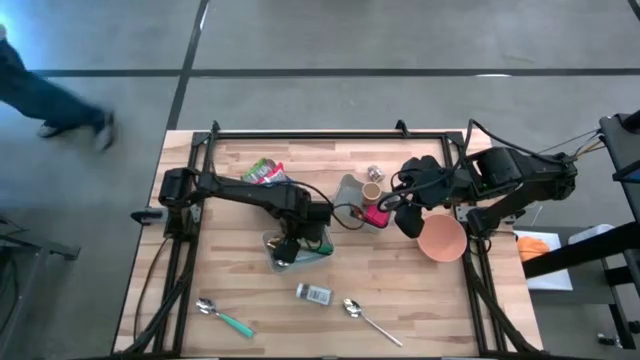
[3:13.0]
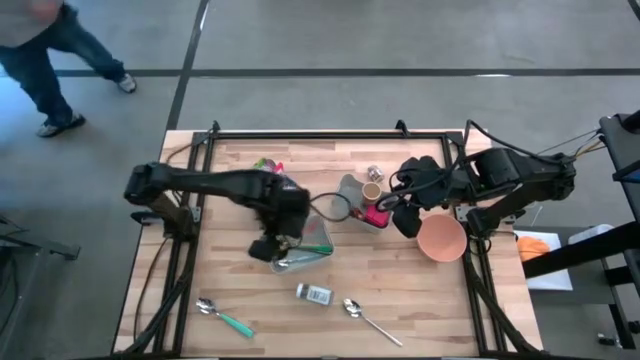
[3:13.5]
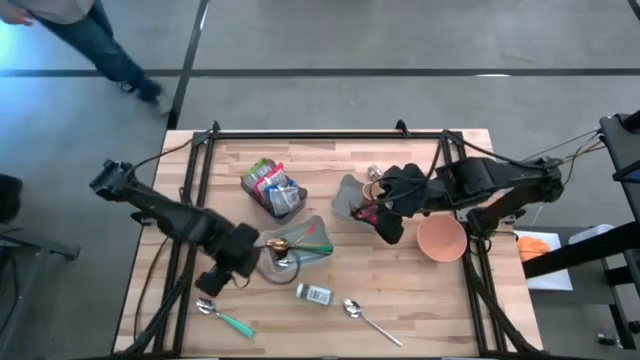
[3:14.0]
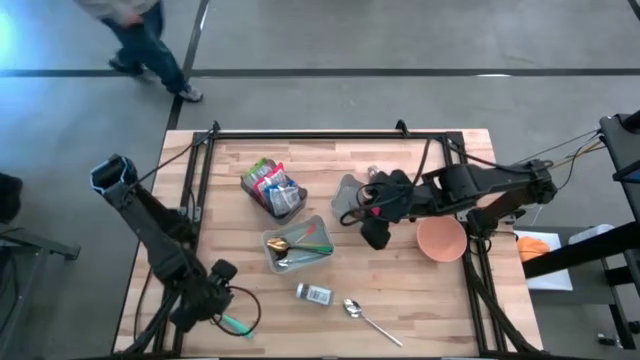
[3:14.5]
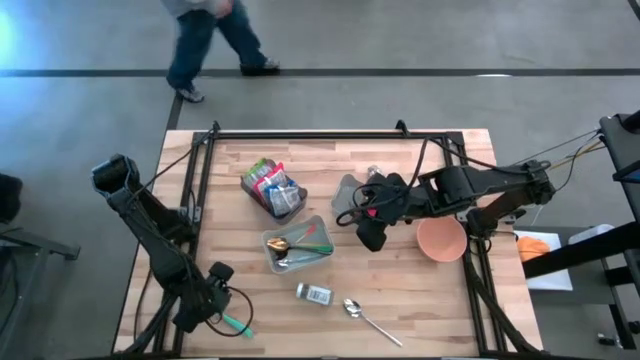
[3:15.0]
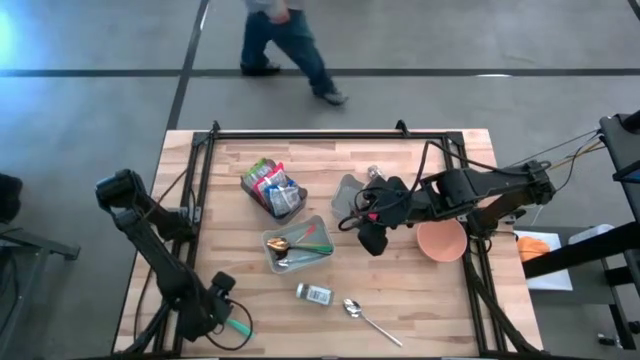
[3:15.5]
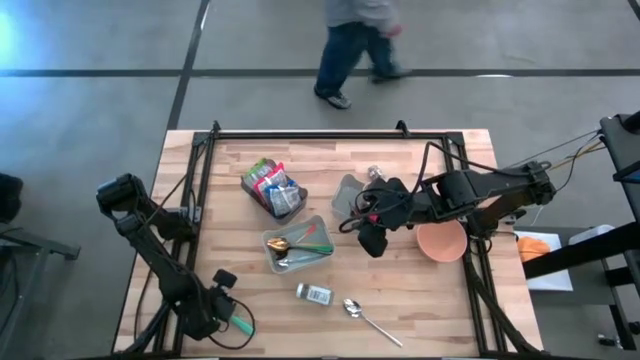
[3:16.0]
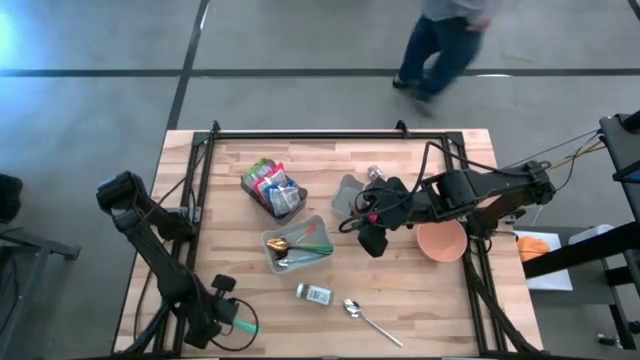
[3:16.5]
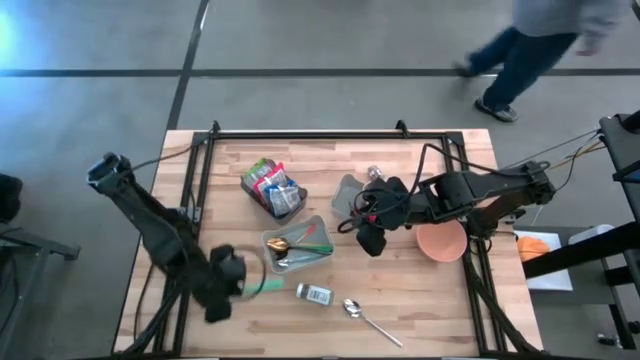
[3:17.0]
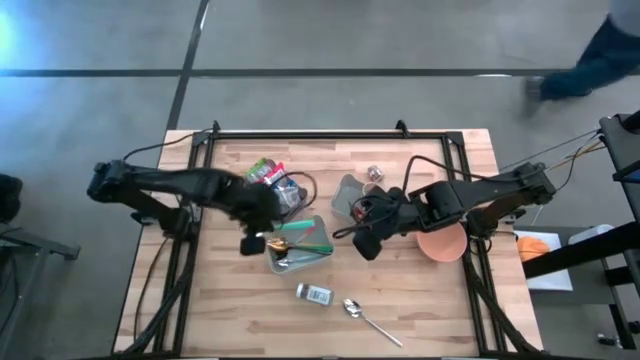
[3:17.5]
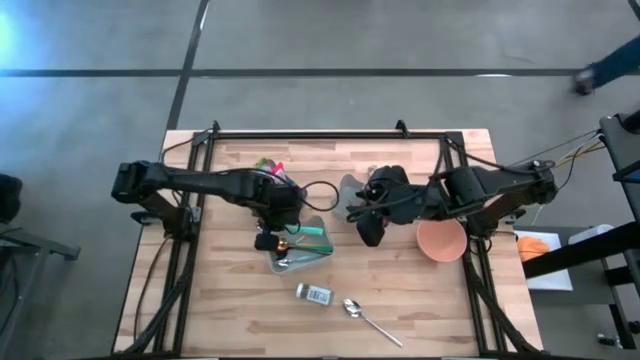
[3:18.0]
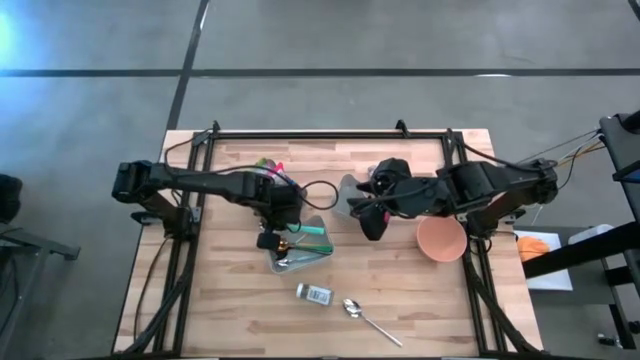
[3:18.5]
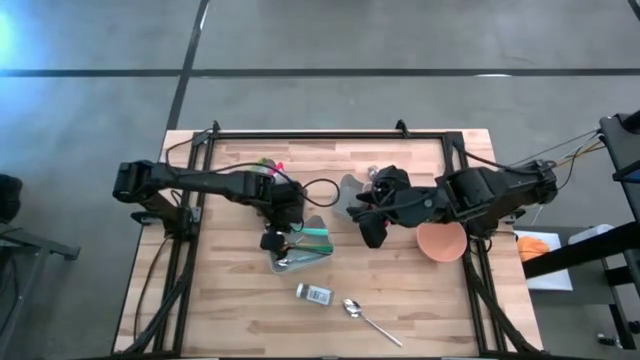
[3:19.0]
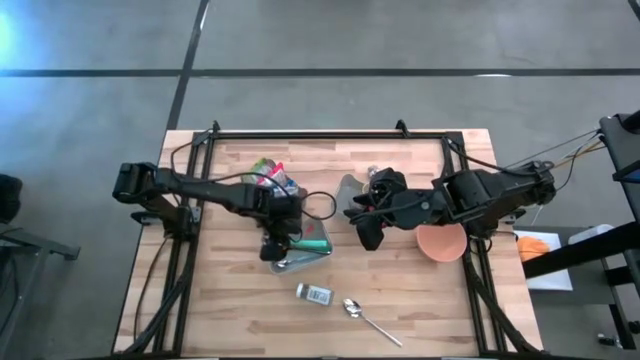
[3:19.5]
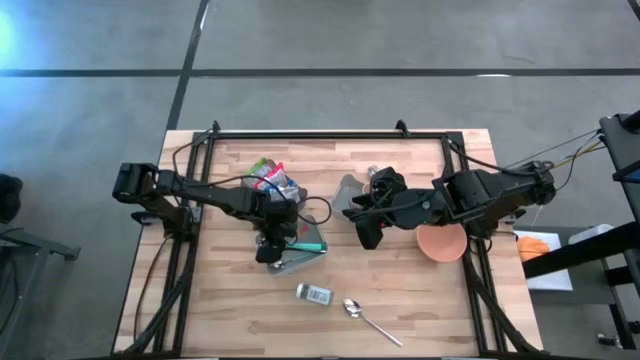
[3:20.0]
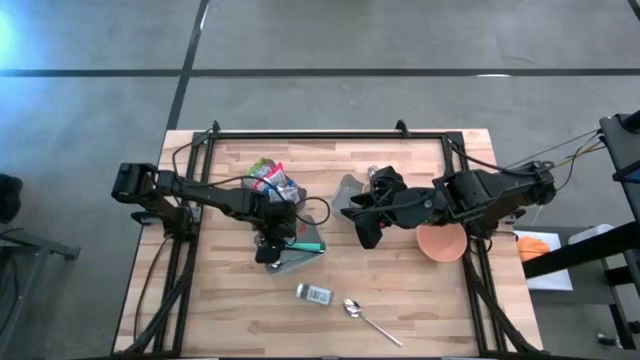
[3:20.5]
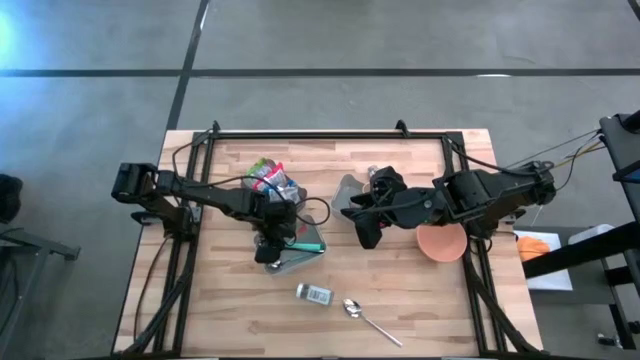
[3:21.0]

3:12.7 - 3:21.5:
Put the light green spoon into the bottom gray bin

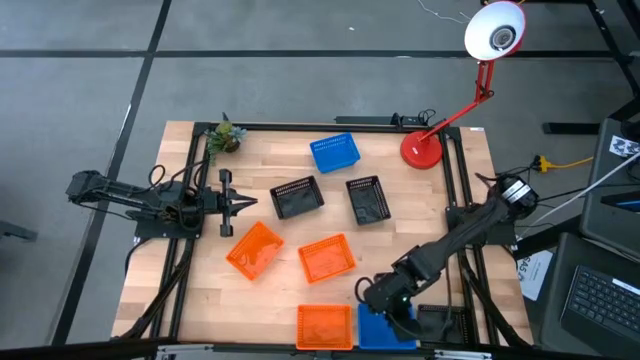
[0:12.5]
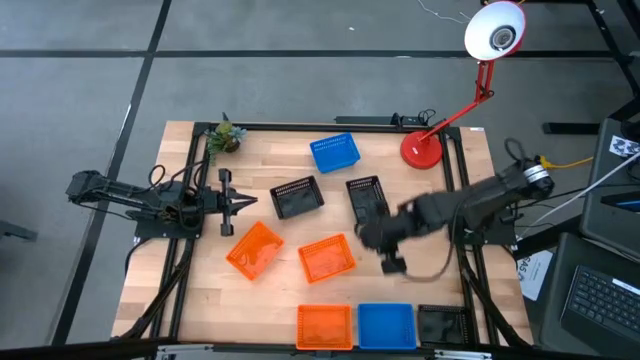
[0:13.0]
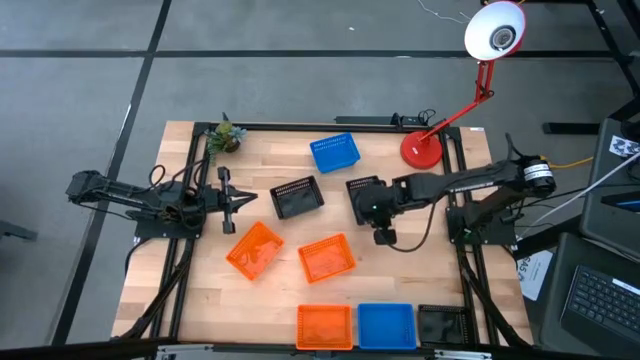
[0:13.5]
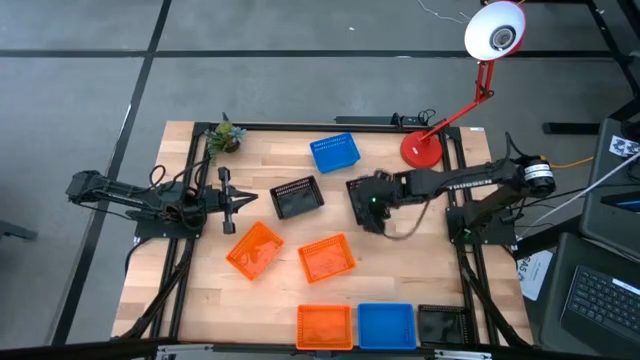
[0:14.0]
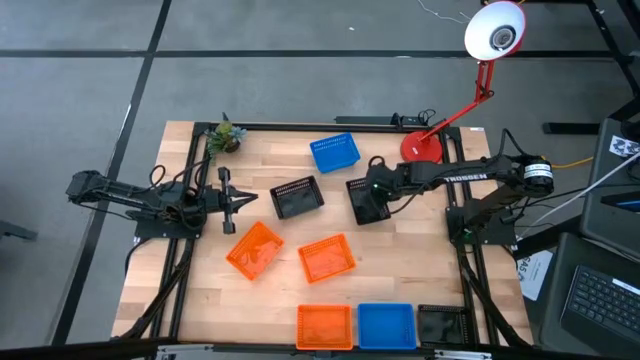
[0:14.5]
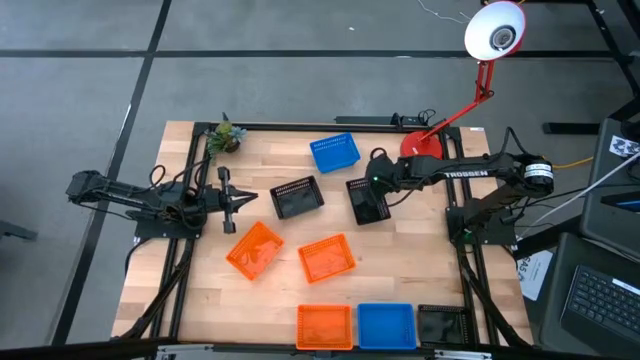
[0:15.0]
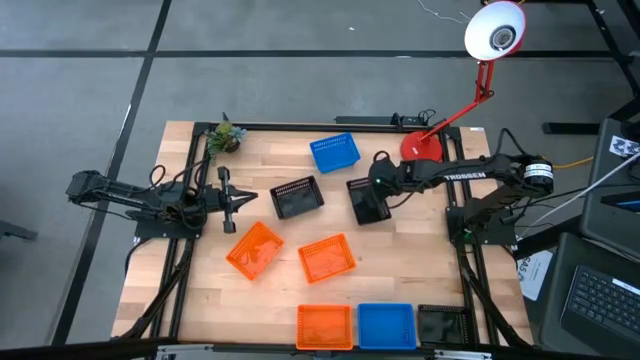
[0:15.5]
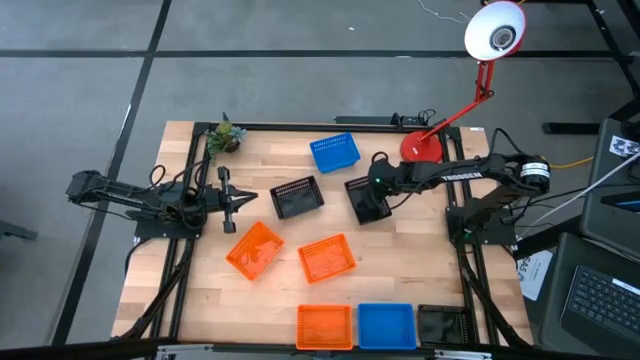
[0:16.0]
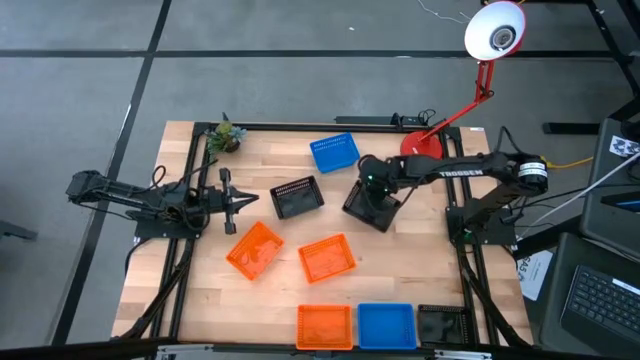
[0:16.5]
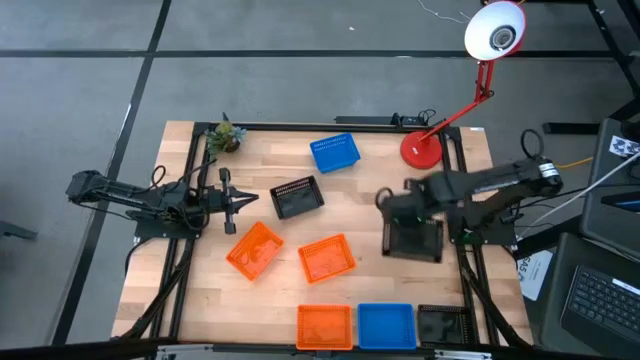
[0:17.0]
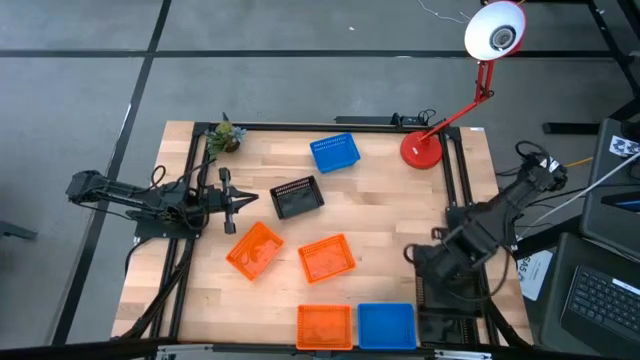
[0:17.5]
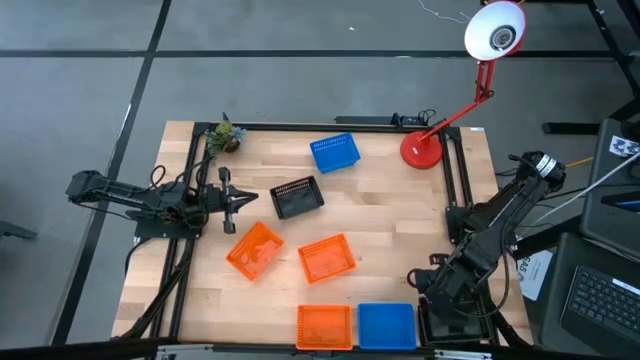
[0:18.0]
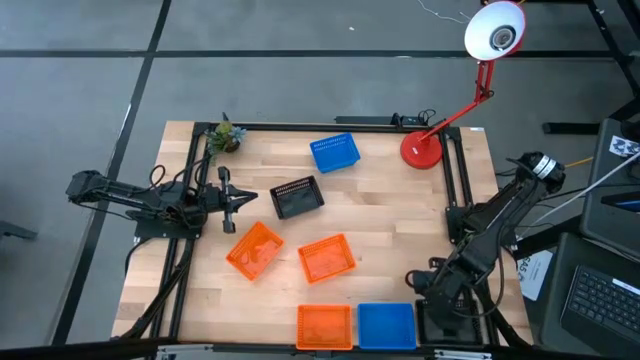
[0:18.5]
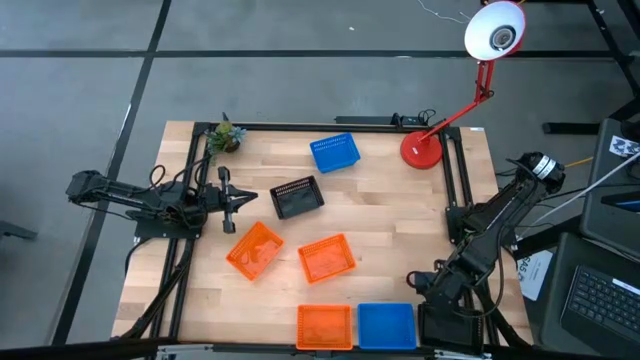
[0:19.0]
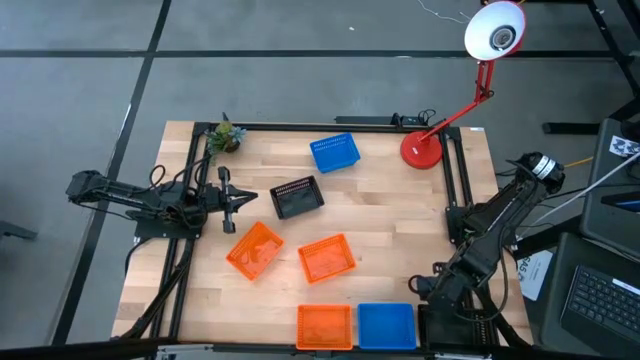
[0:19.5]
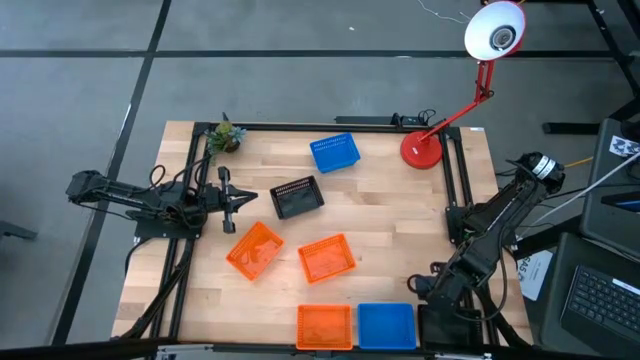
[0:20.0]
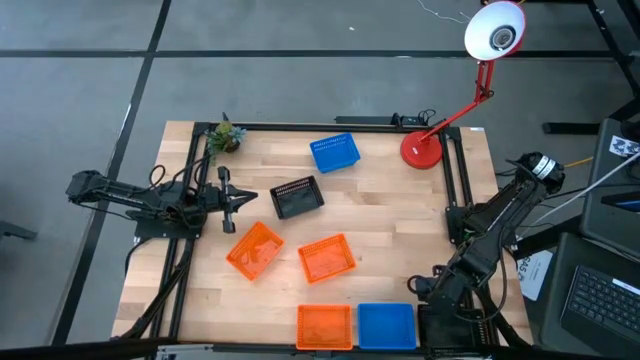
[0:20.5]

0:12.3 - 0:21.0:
Stack the top right black bin on the bottom black bin

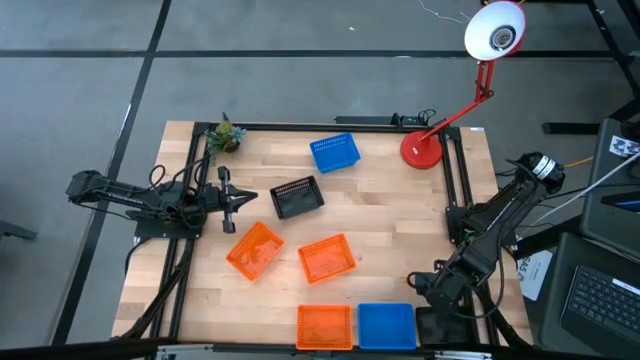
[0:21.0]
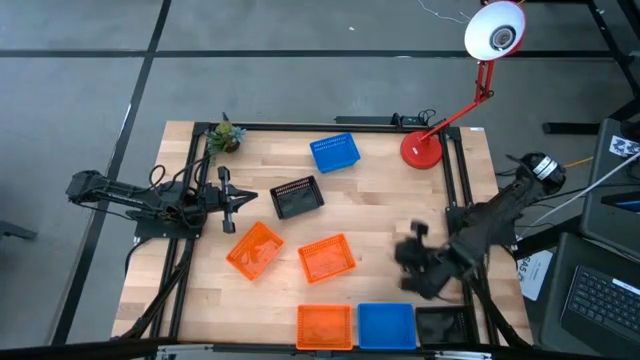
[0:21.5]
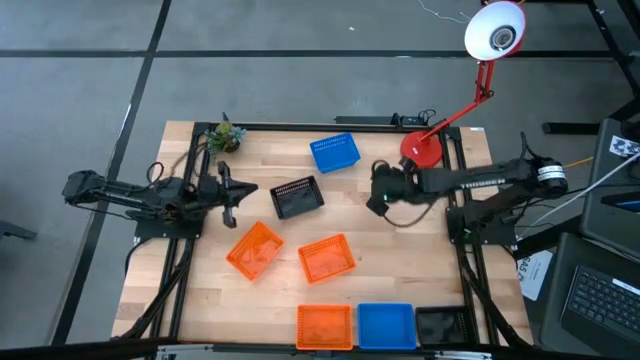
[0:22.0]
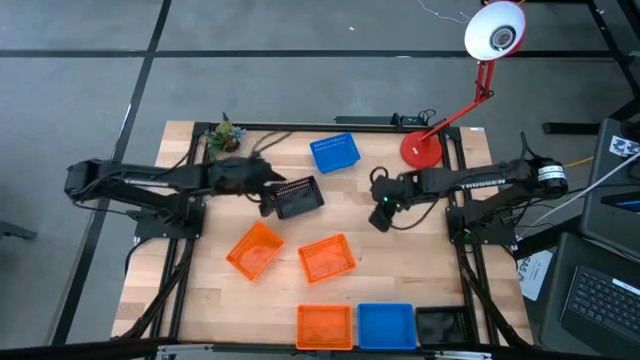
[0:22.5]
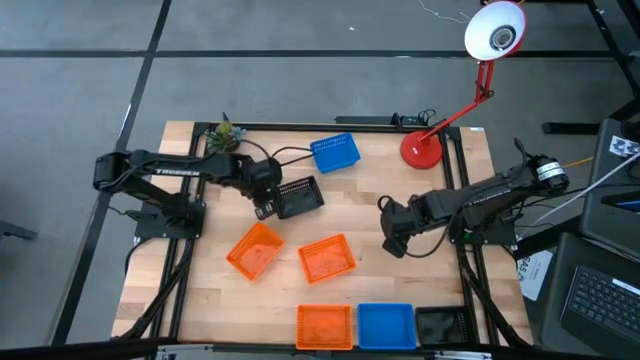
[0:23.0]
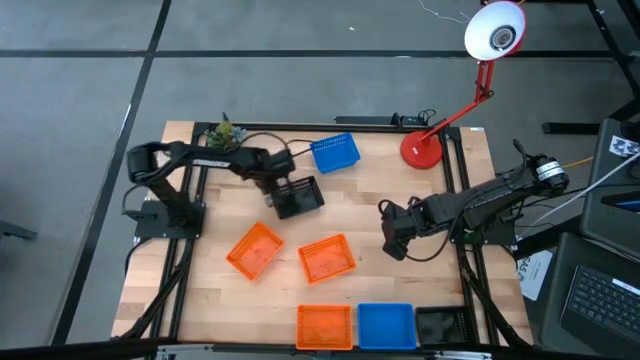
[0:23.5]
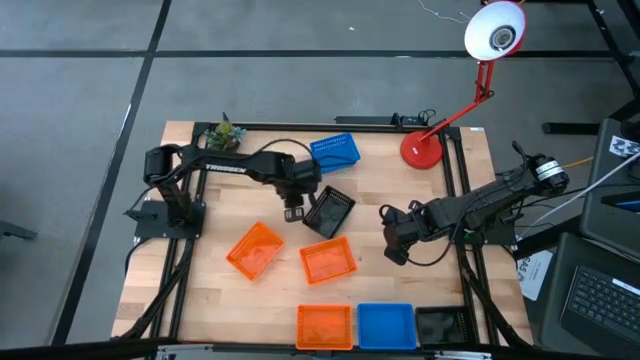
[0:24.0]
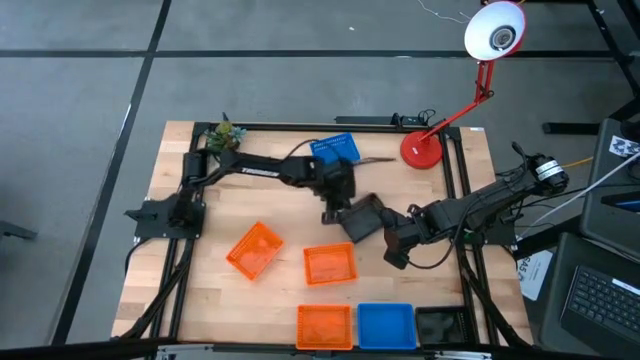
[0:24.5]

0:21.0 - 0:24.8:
Move the black bin to the right on the table
